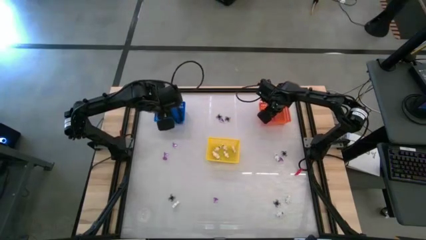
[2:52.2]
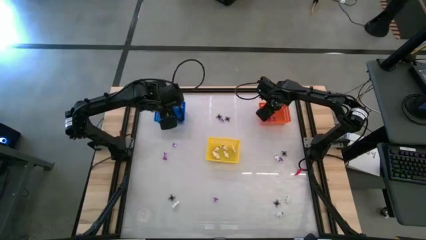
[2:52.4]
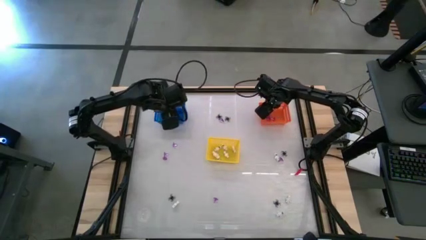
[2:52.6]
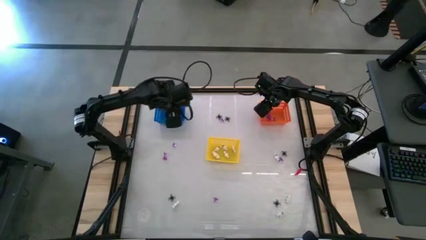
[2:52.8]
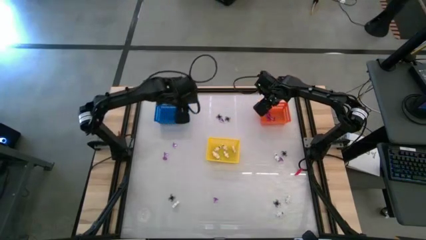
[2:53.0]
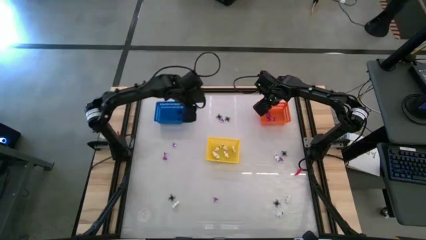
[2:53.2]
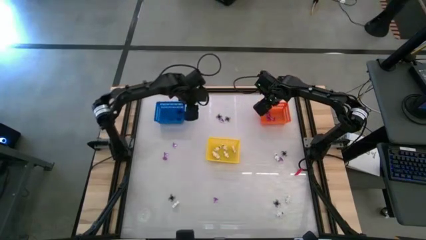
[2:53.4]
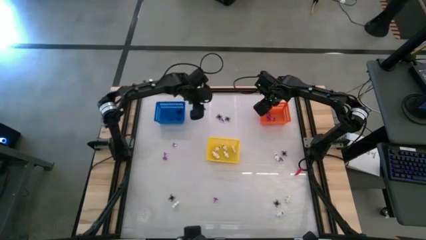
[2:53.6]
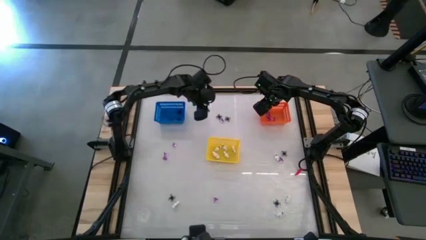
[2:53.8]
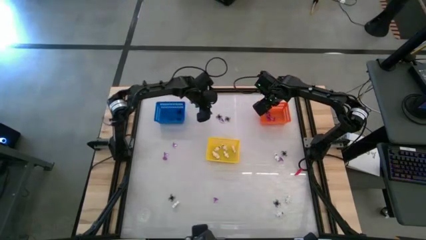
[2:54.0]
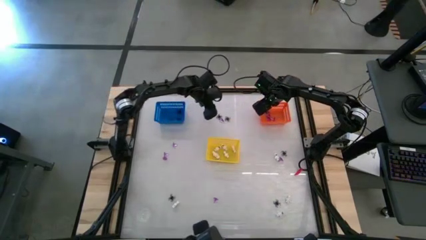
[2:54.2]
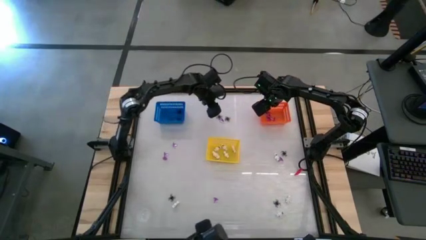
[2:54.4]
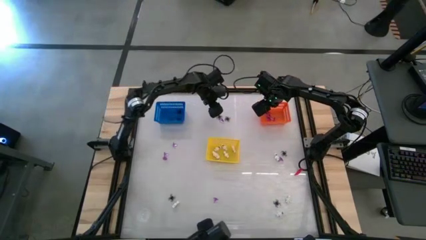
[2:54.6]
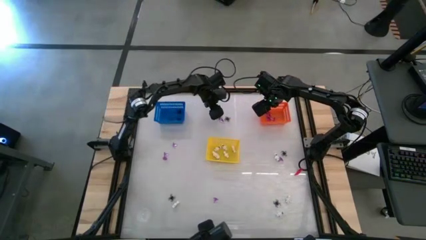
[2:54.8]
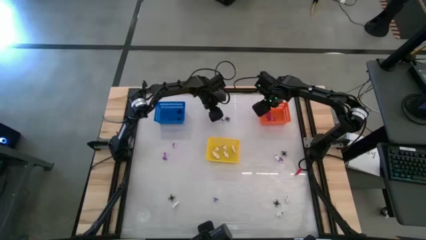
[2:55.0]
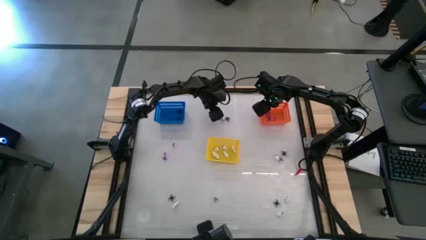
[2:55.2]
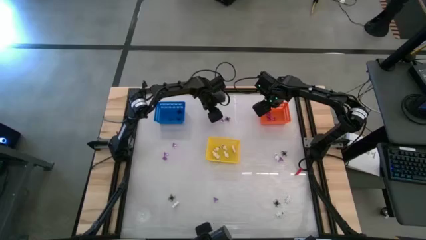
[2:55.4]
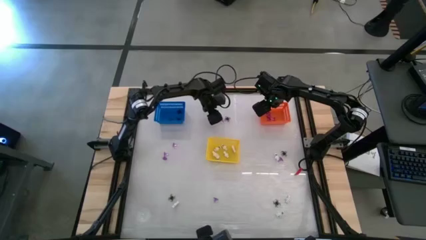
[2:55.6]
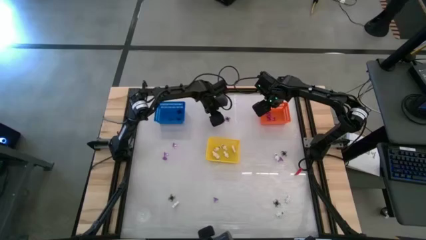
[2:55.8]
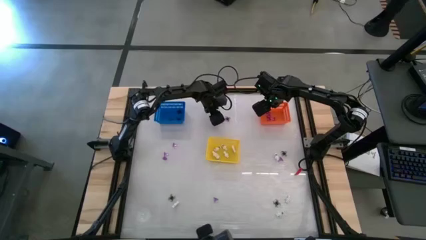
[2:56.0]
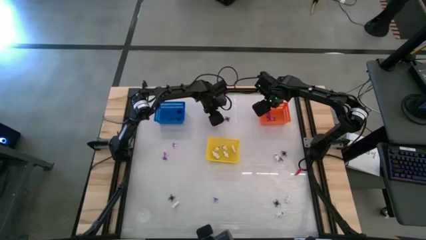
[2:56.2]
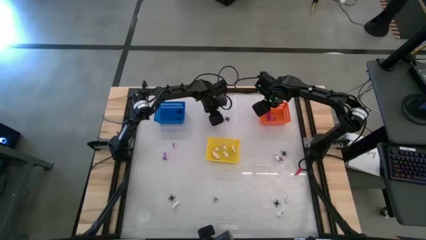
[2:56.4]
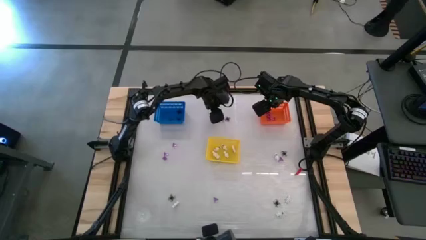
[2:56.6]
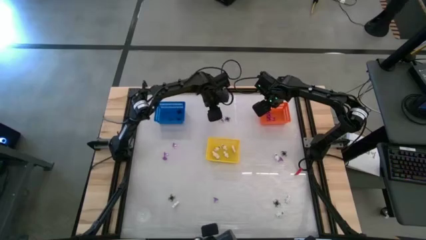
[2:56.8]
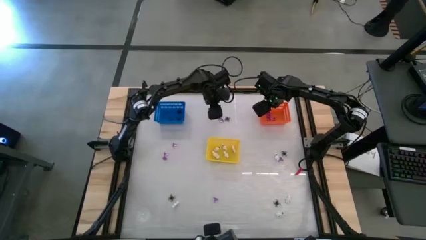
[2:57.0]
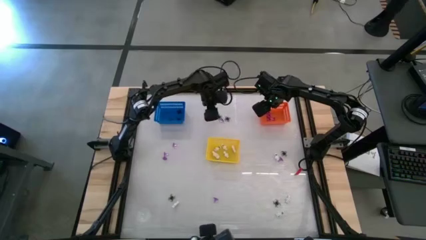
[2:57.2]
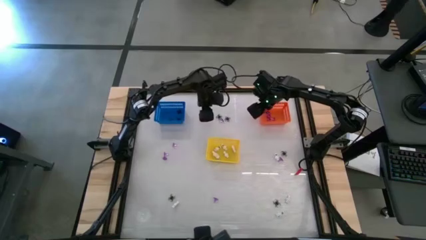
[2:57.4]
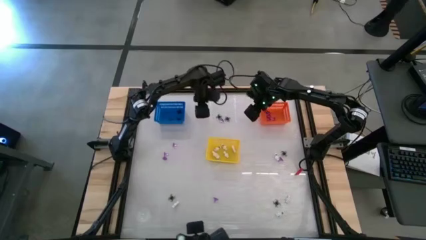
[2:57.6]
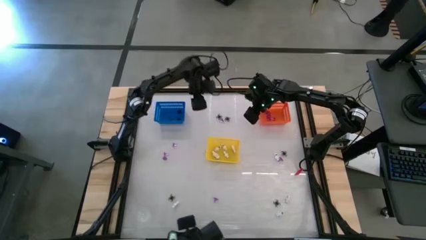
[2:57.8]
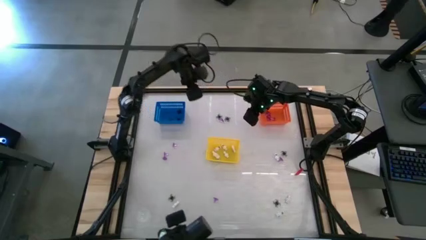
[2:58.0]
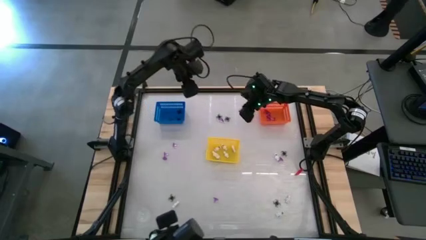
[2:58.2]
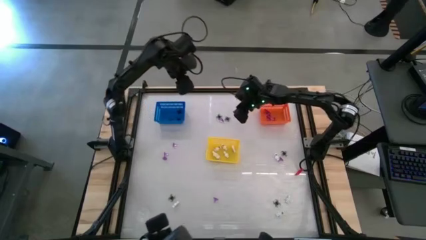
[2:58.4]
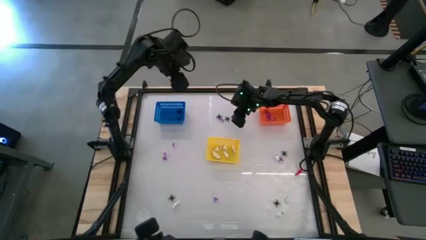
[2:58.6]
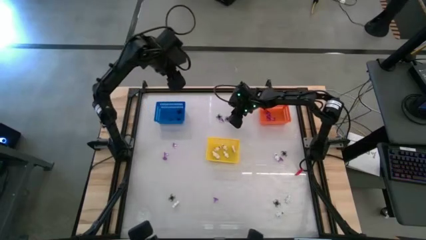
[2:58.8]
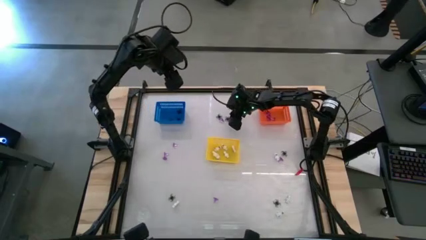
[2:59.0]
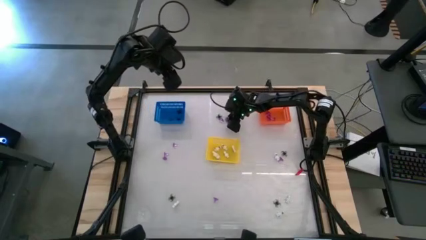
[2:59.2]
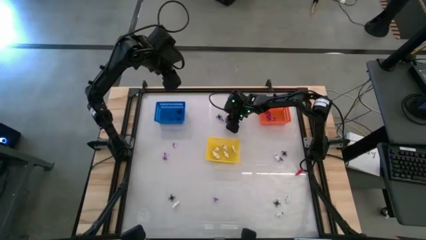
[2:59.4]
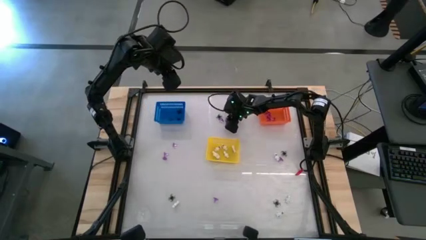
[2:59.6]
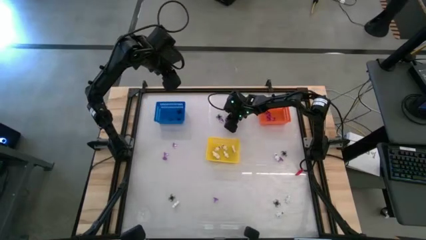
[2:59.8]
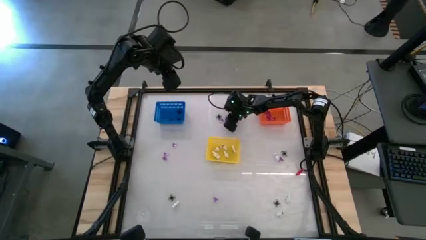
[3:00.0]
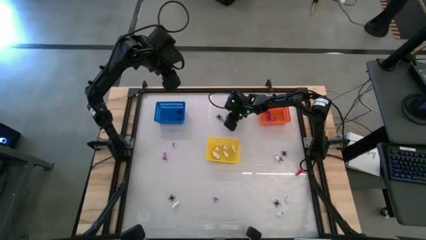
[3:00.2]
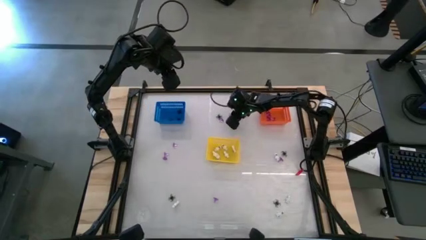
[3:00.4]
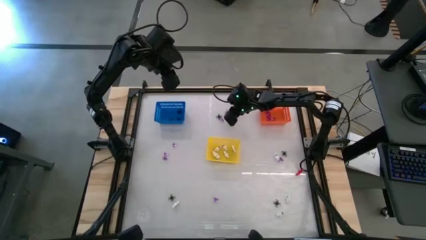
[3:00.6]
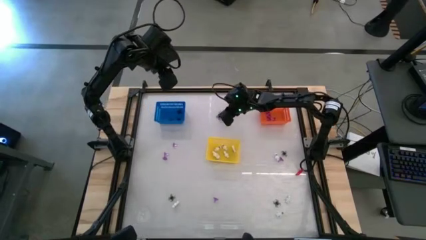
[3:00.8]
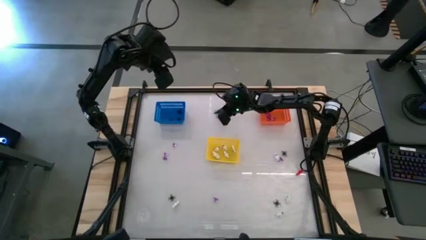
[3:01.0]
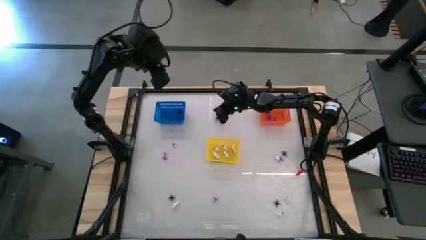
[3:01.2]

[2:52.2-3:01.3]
Task: Sort Halloween decoration
Put the black spider toy into the blue bin

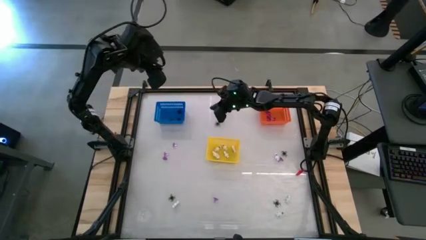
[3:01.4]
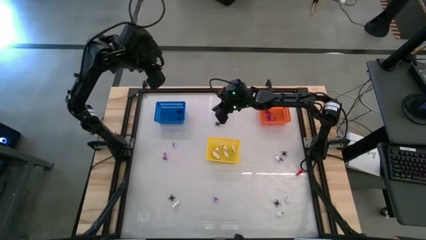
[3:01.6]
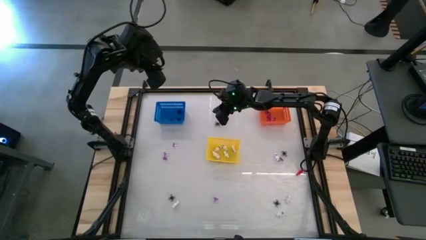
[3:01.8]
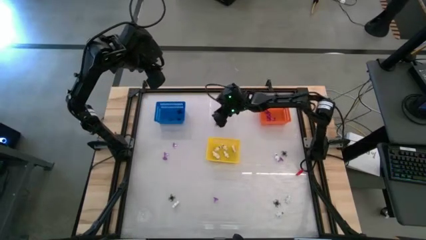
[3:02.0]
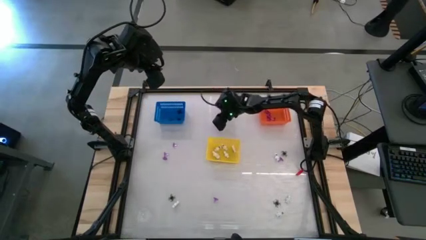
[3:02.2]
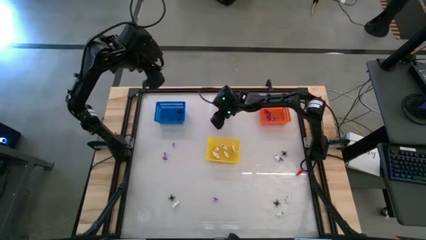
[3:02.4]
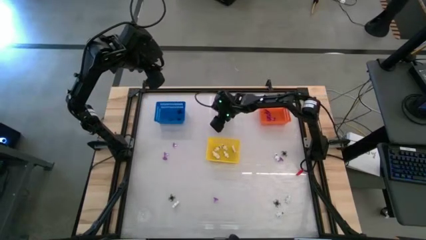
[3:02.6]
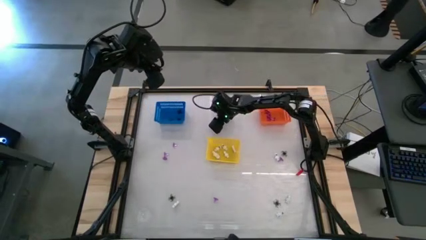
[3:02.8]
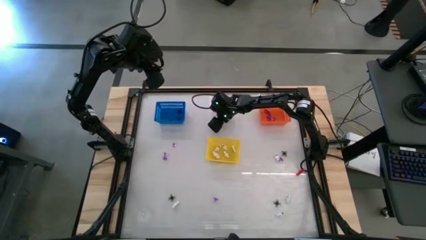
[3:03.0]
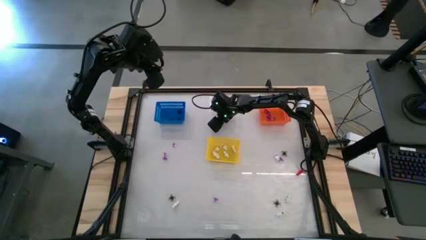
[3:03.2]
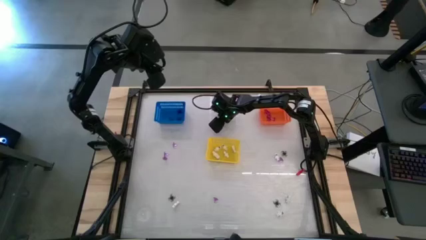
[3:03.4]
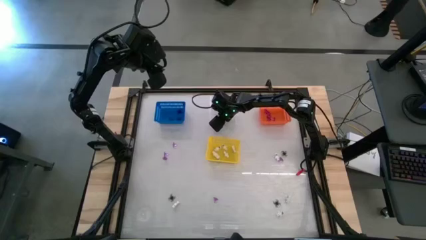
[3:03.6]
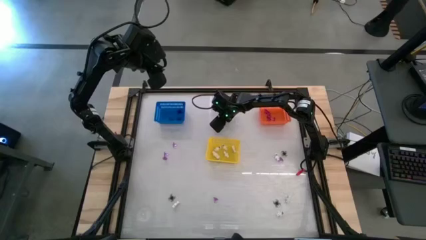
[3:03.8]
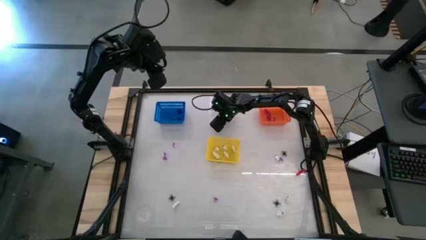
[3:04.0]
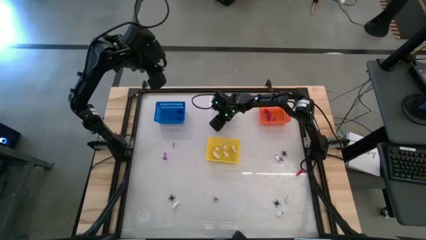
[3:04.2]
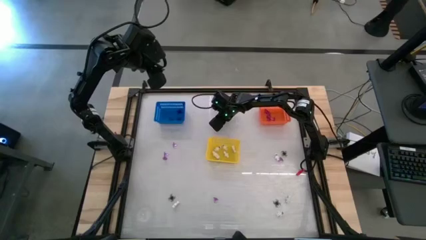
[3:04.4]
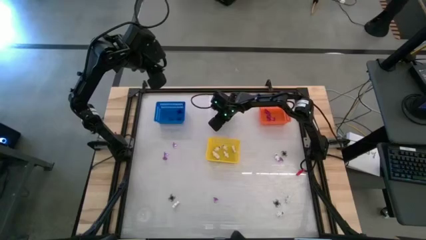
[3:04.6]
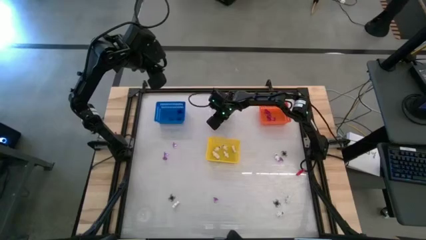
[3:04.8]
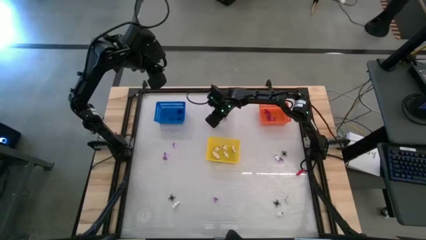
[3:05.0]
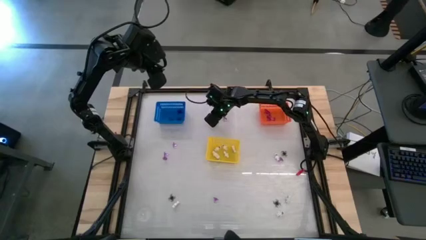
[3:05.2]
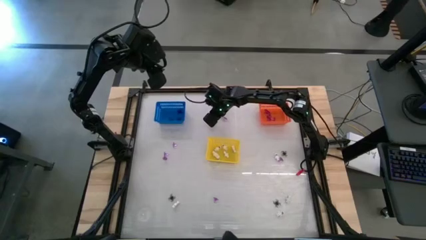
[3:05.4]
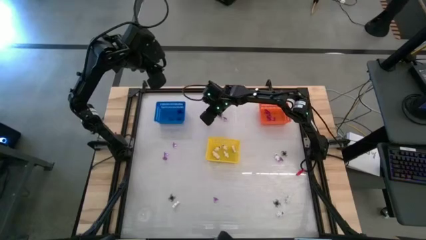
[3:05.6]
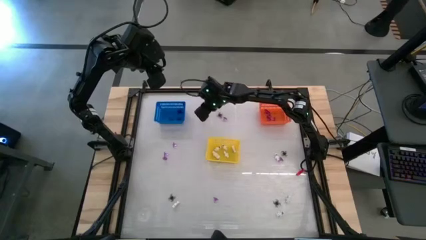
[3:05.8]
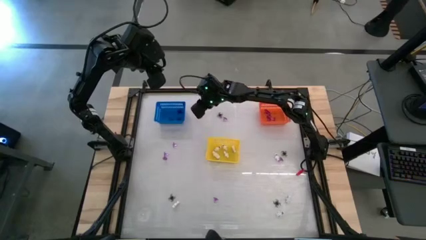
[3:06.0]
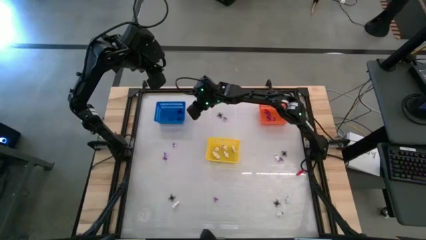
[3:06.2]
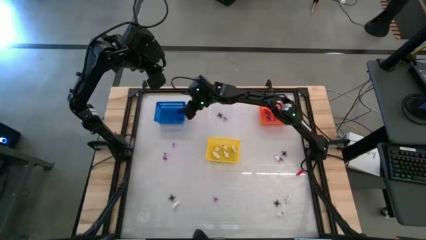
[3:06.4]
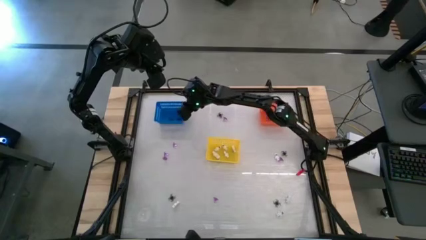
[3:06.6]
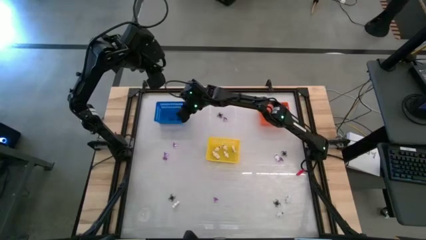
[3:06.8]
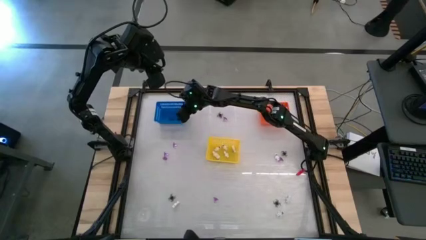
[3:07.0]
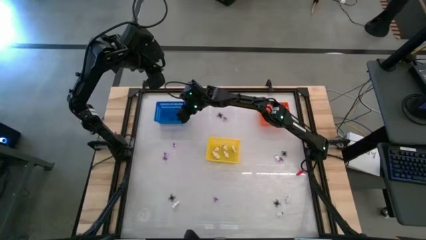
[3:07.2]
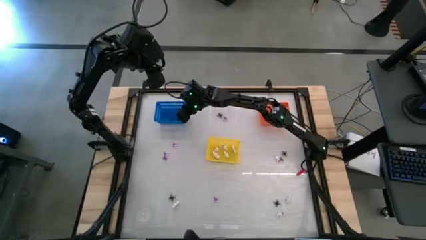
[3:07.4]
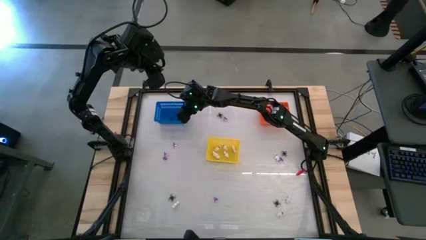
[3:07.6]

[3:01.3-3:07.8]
Put the black spider toy into the blue bin
